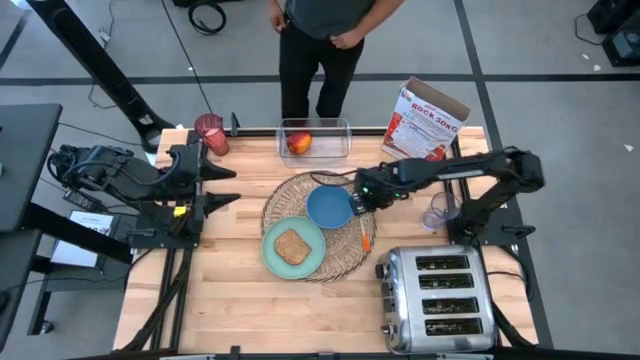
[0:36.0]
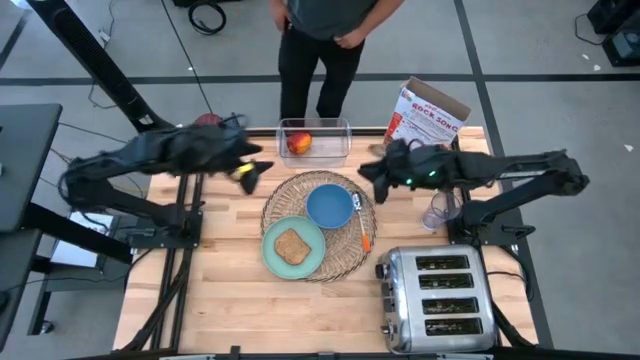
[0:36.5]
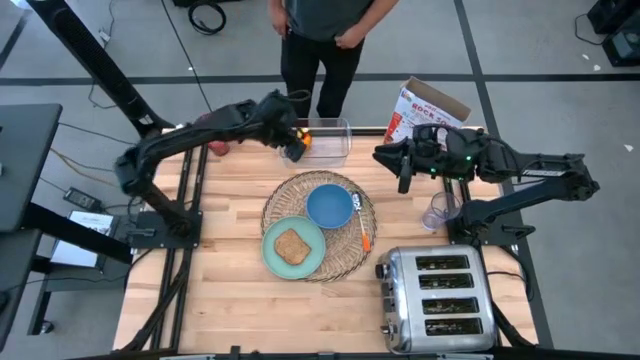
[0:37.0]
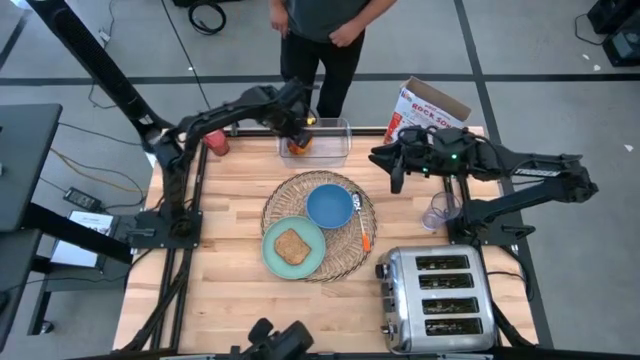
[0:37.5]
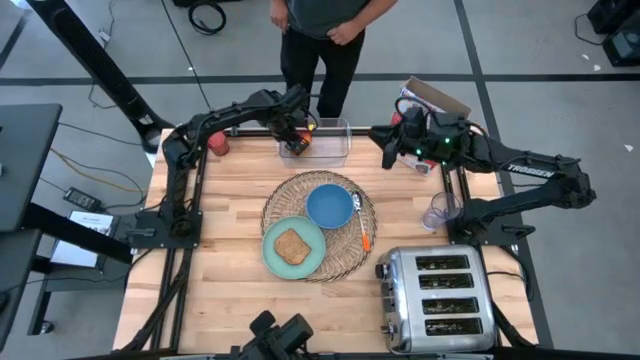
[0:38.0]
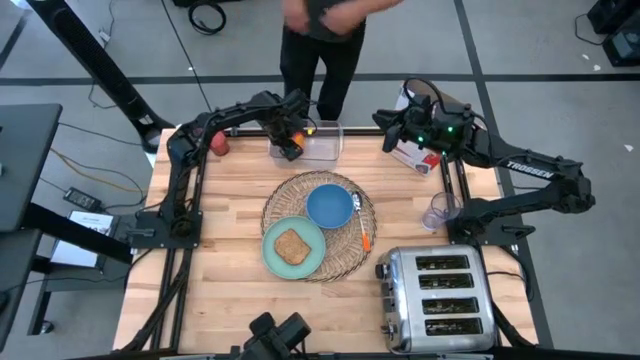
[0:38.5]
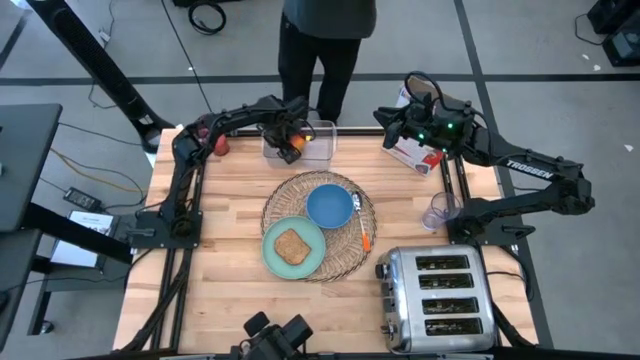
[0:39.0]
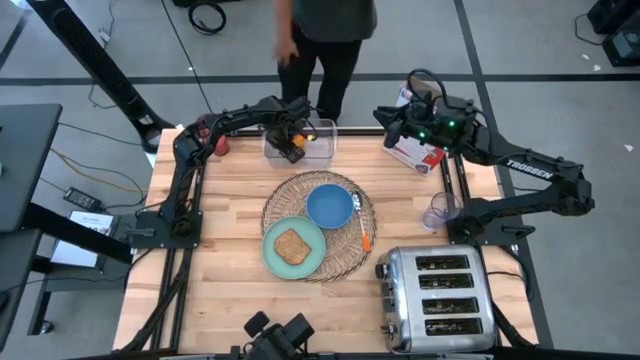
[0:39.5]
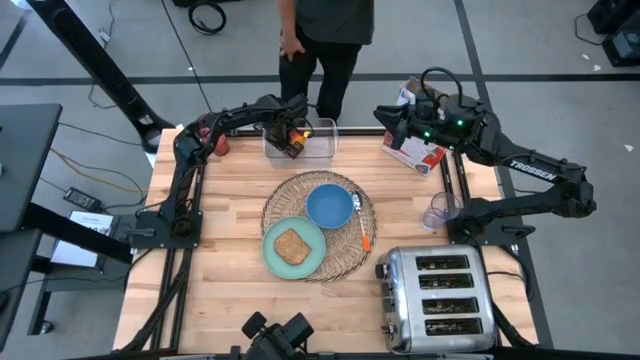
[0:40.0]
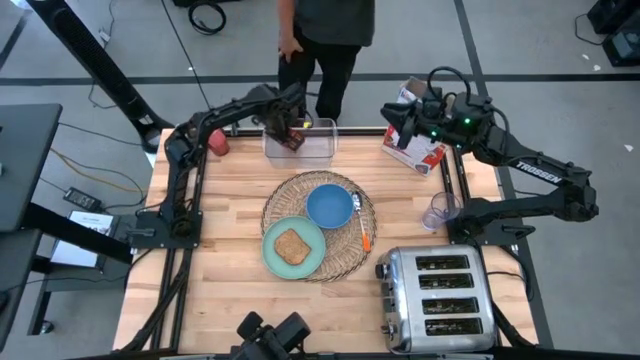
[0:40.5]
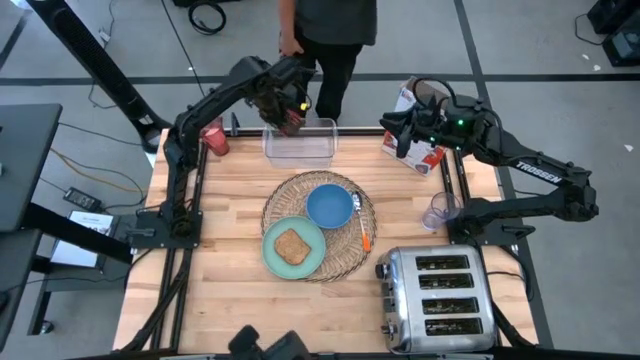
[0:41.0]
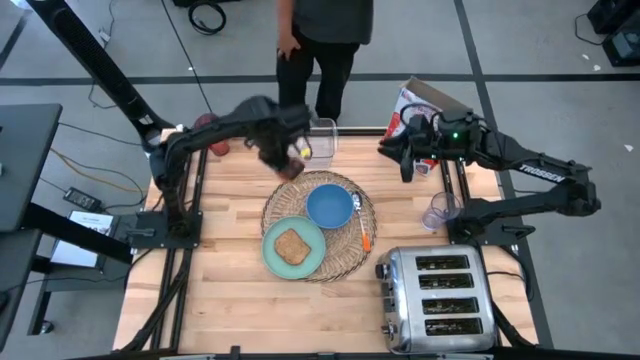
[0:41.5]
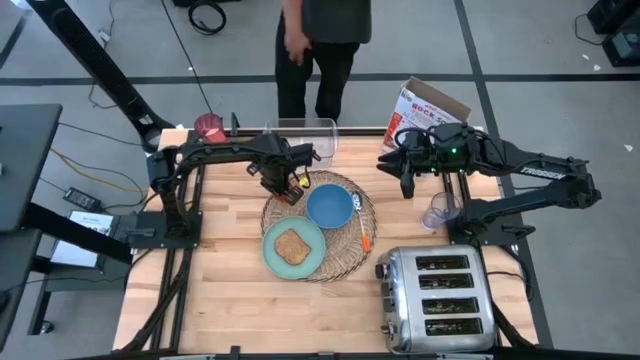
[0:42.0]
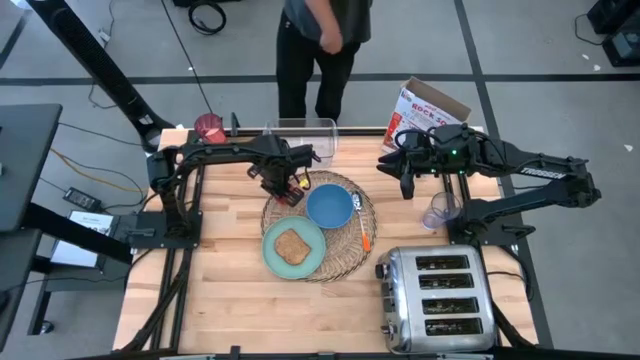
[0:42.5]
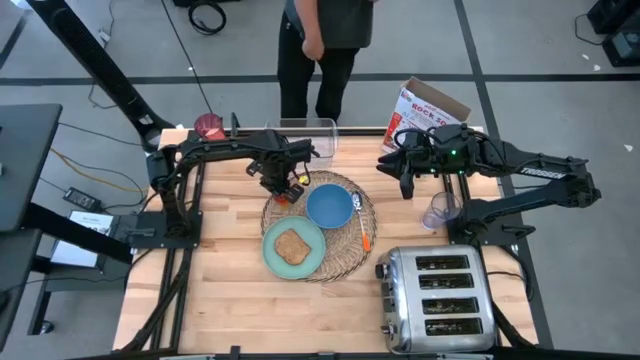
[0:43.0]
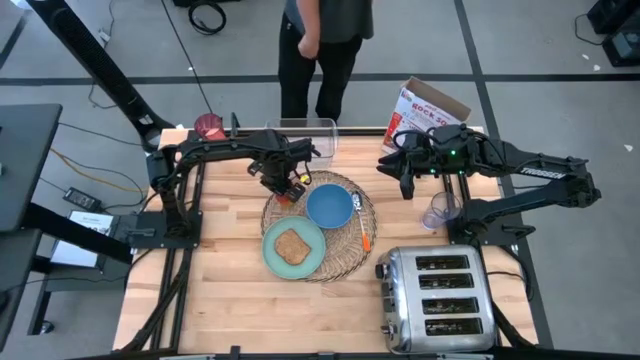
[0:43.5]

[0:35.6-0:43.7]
Task: Arrange a breakfast setting
Put the apple on the table mat

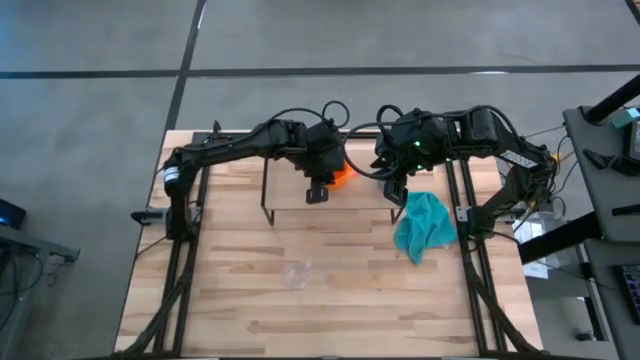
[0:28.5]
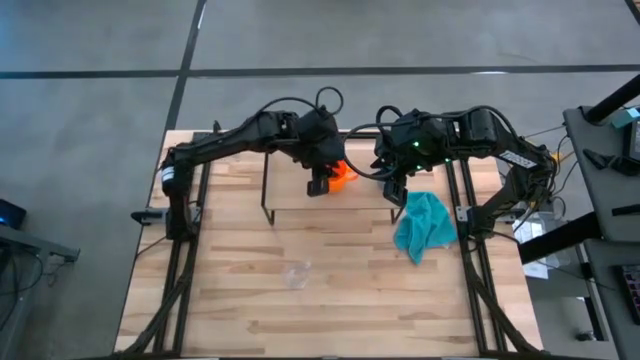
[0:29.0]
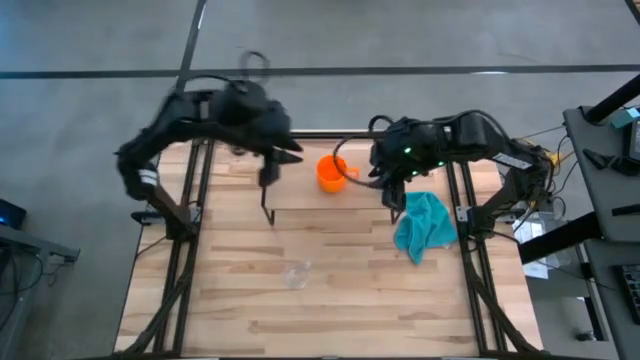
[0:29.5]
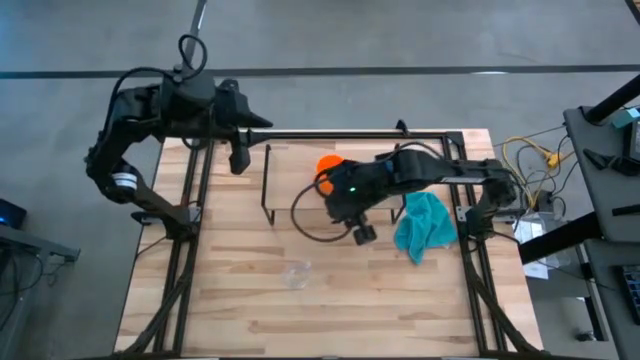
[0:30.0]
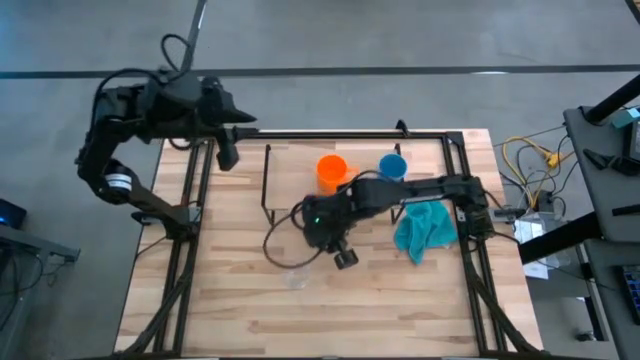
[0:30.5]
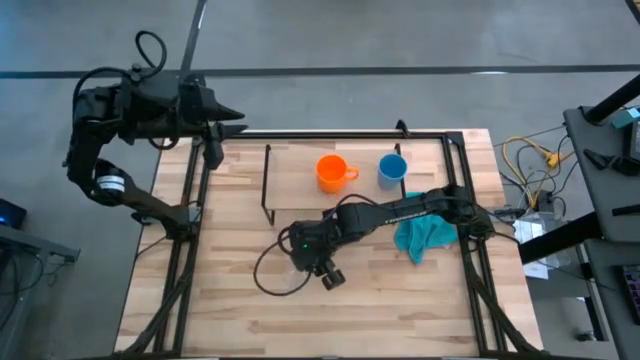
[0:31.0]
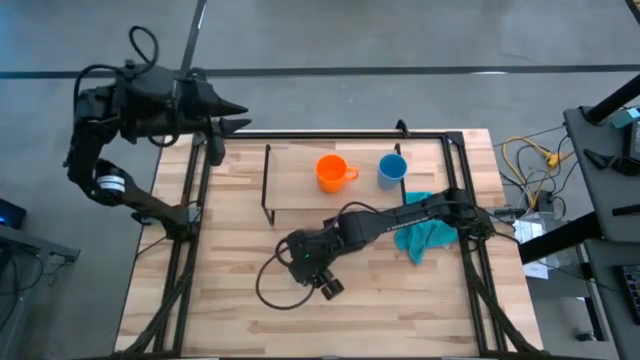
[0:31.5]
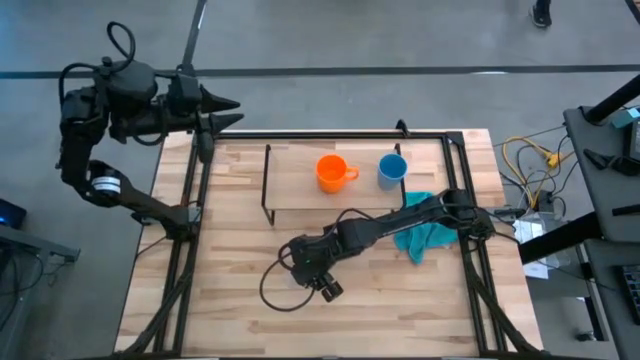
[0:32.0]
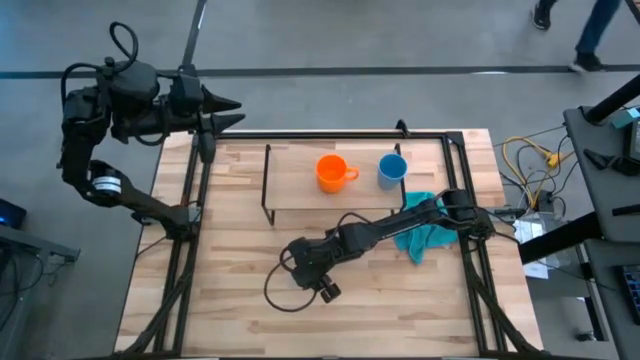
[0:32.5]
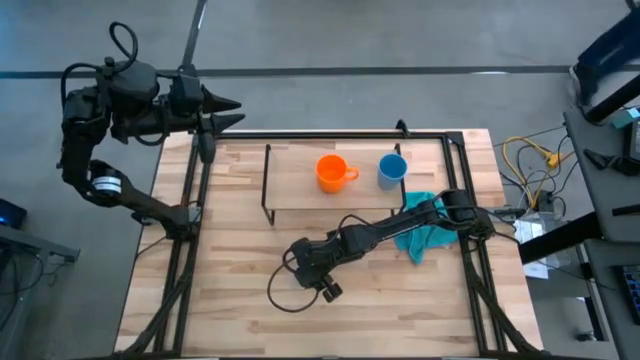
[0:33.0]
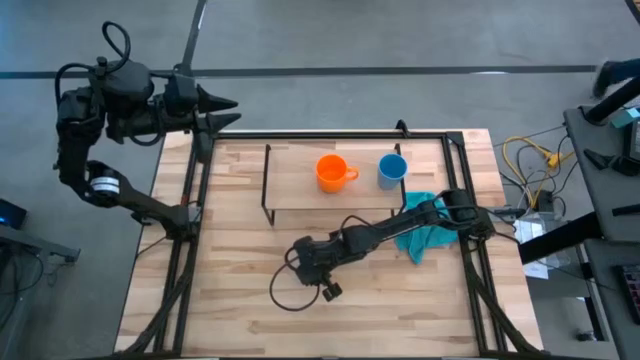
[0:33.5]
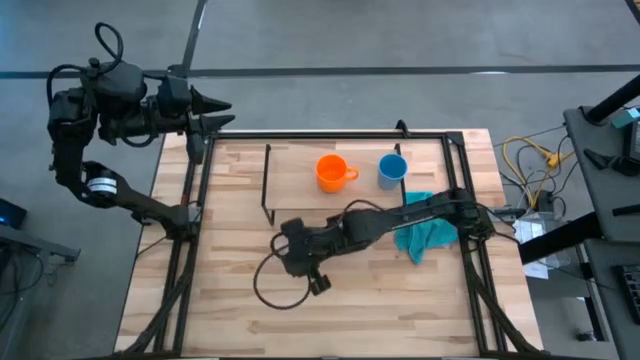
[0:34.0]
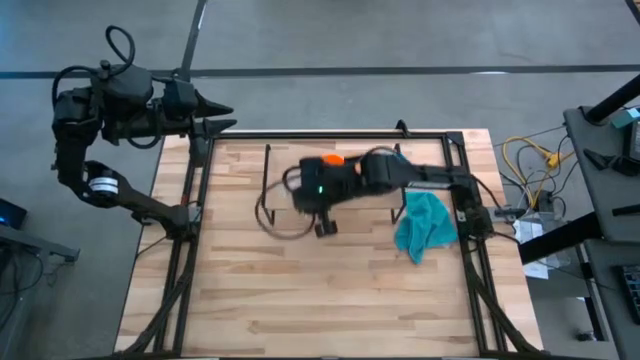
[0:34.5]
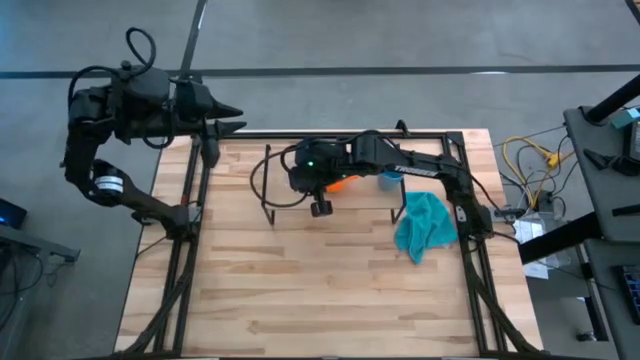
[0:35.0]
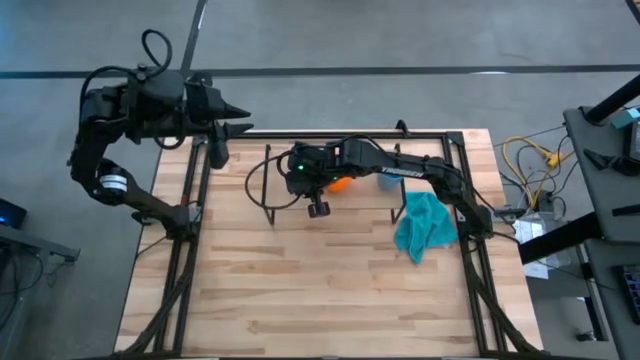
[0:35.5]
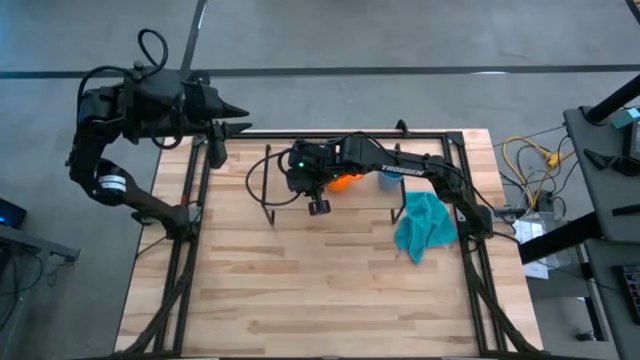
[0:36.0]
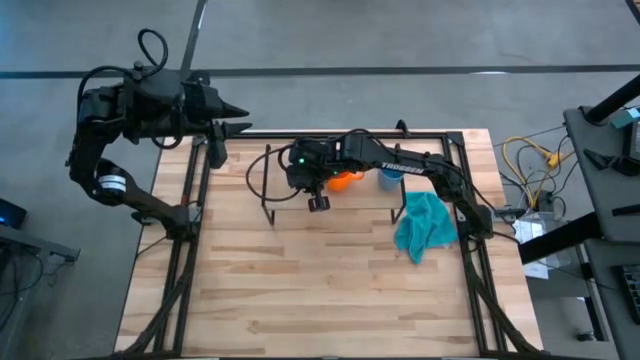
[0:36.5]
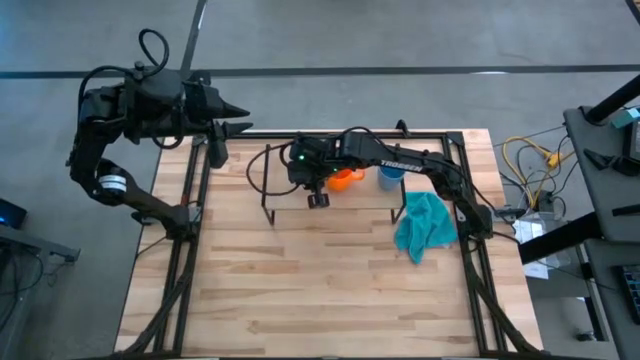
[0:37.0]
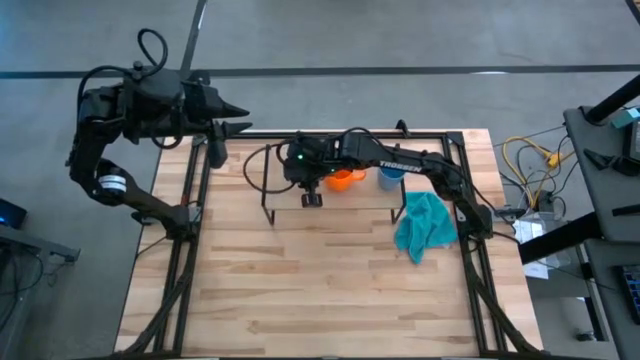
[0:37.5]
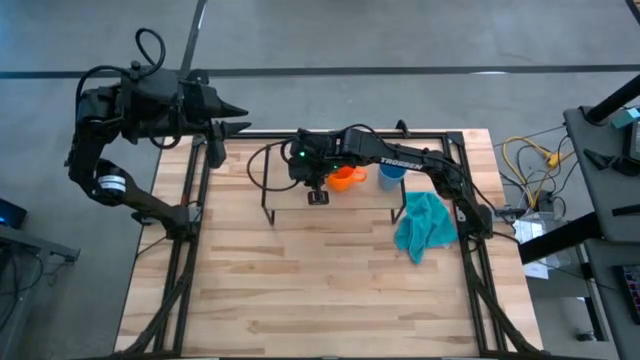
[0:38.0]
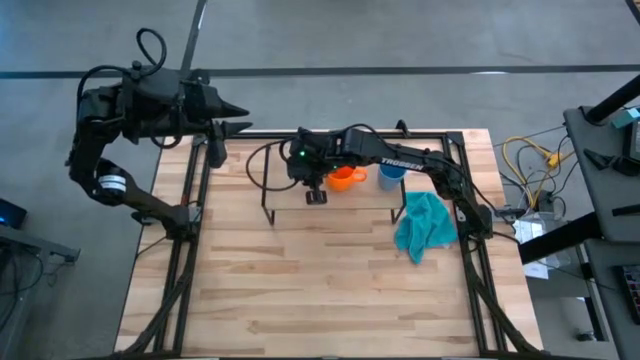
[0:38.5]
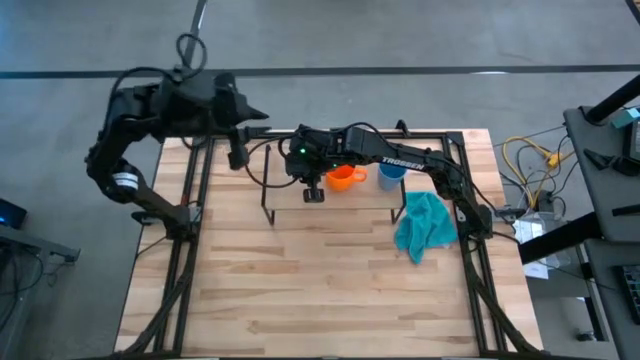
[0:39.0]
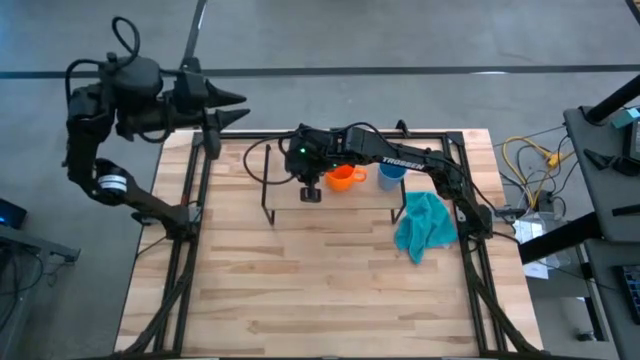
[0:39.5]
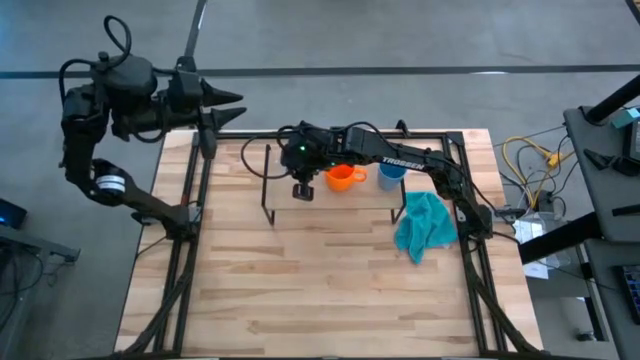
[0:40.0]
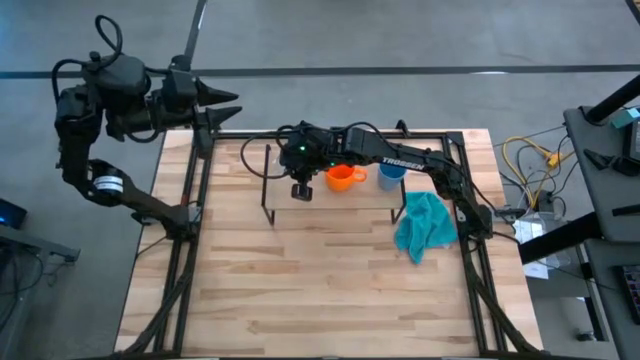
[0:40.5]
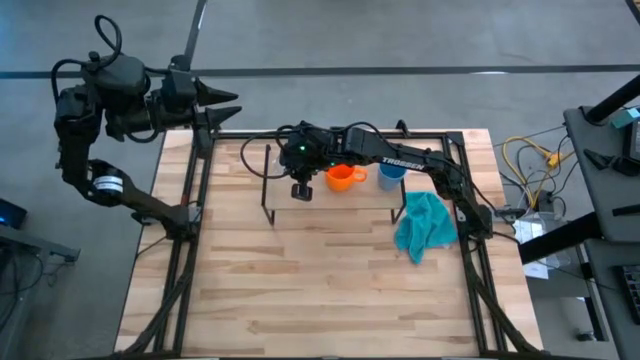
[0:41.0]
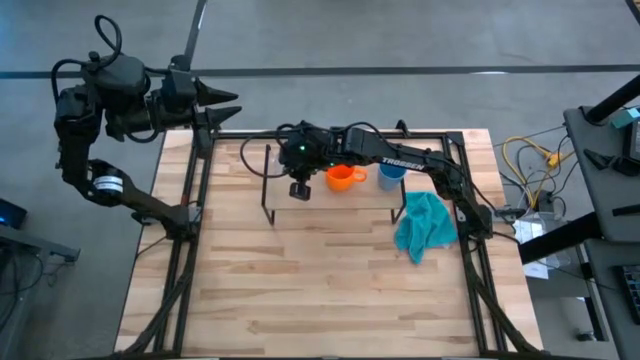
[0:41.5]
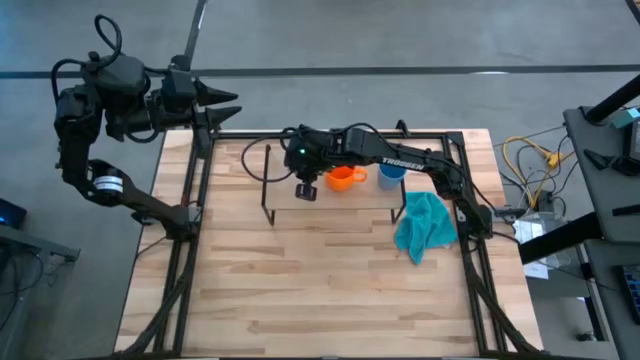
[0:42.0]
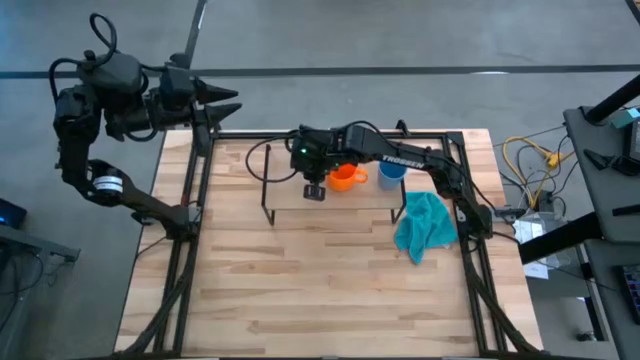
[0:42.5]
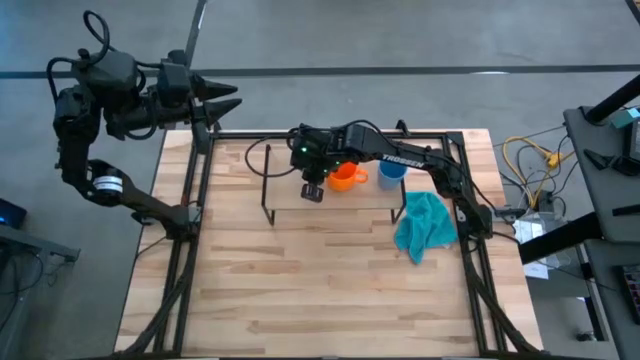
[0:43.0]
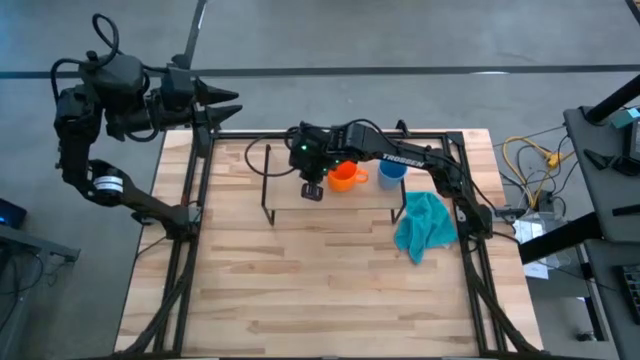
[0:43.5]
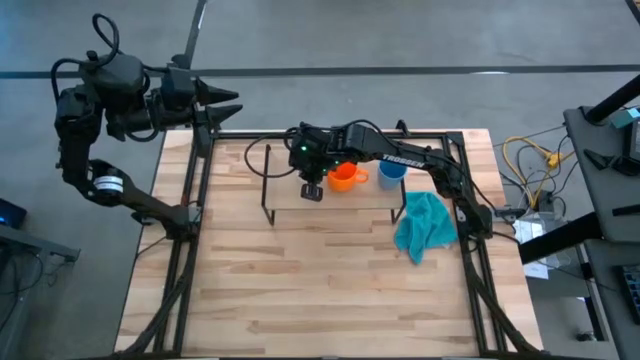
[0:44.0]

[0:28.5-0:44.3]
Task: Stack small to large cups/mugs on shelf
Put the transparent mug onto the shelf
